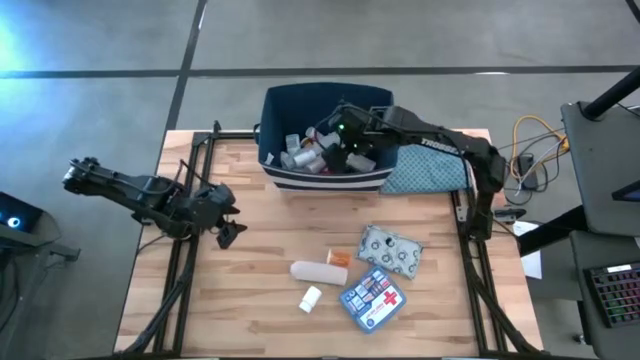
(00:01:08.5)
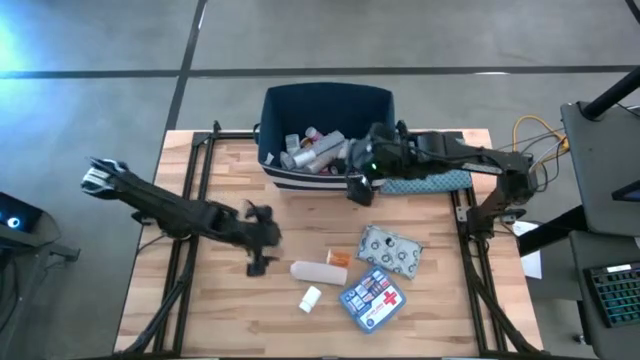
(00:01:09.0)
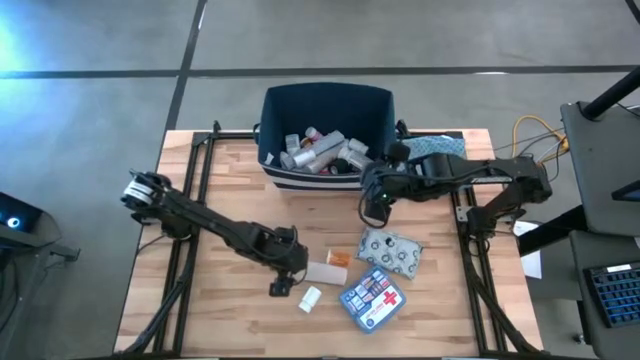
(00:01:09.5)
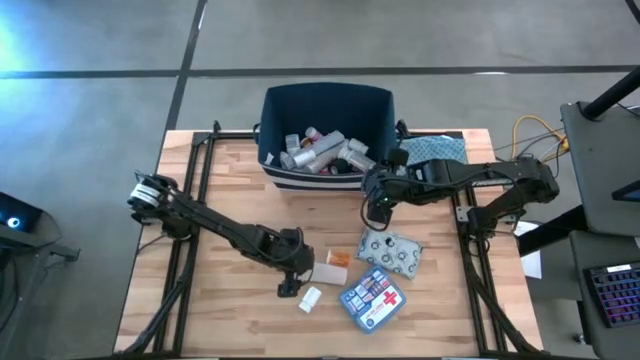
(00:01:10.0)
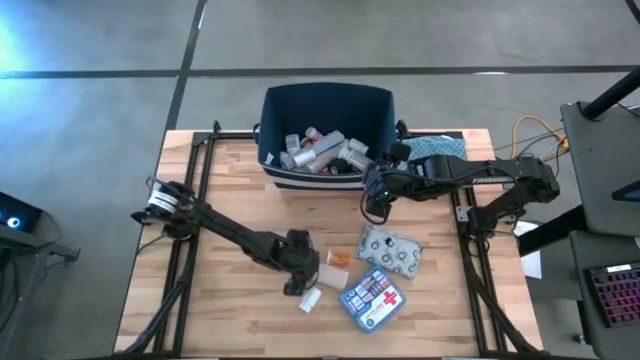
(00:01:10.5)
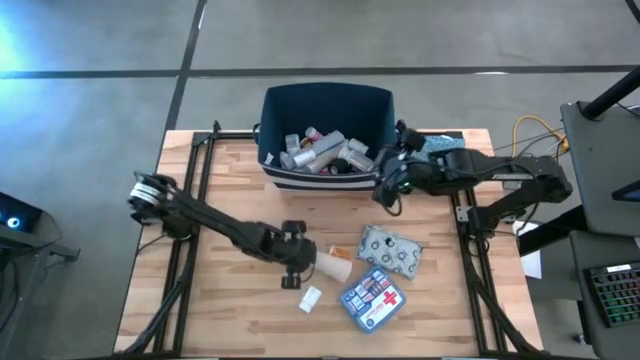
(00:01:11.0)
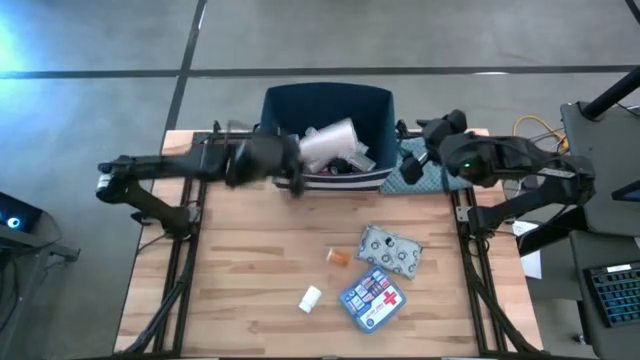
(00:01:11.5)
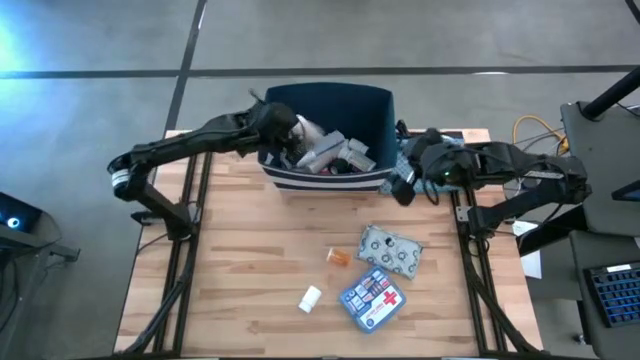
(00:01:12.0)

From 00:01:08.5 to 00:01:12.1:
Task: Pick & place medical supplies in basket/bin
Put the gray bandage into the blue bin

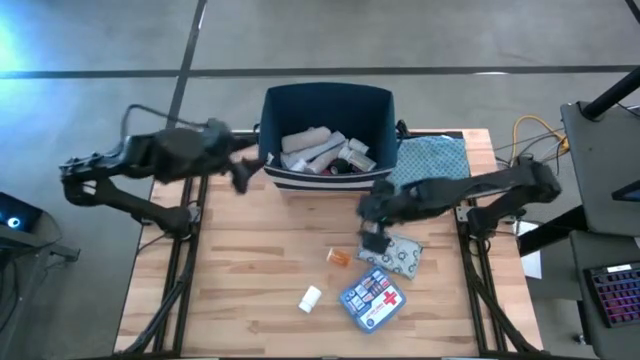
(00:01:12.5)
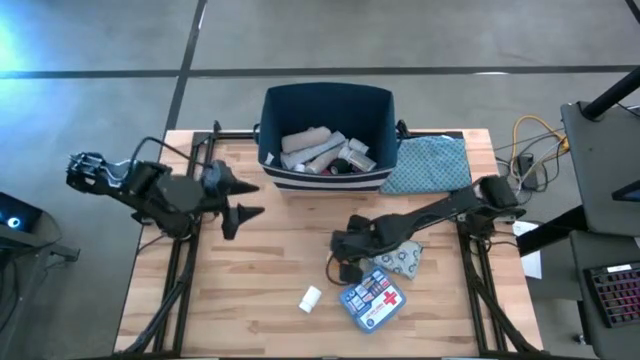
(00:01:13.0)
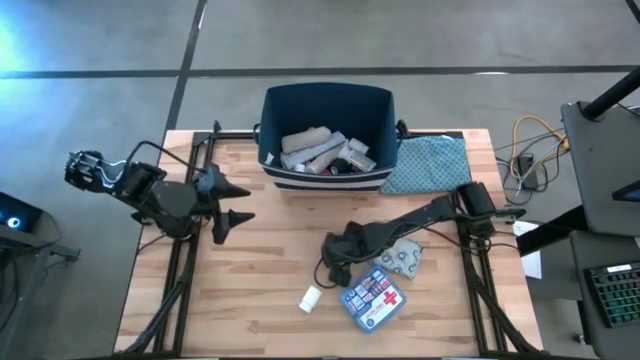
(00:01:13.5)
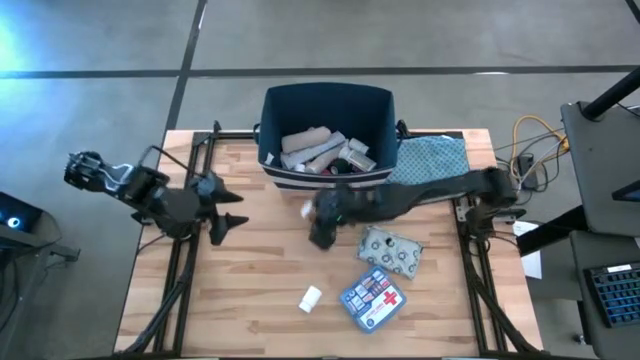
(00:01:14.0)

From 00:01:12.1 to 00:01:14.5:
Put the orange medicine bottle into the blue bin

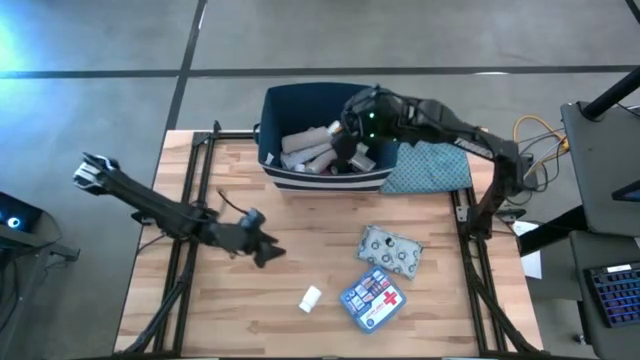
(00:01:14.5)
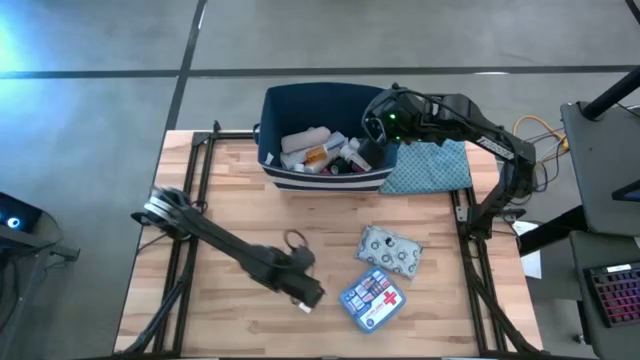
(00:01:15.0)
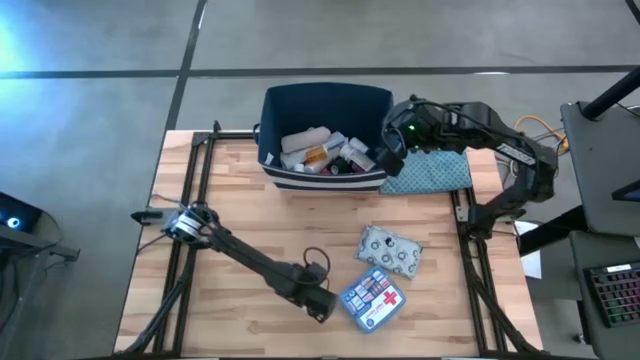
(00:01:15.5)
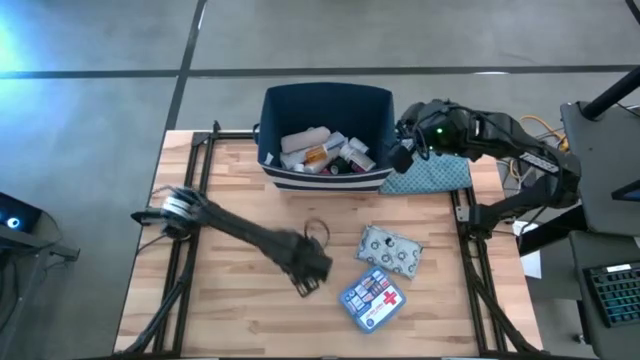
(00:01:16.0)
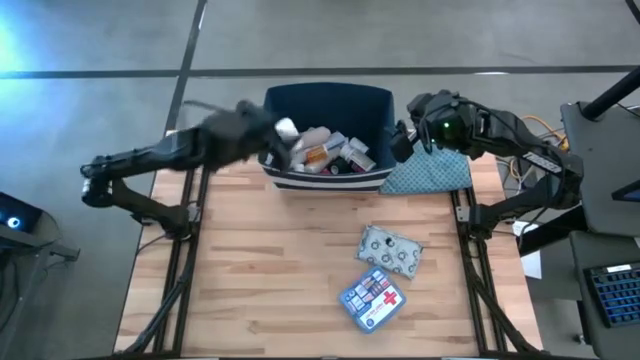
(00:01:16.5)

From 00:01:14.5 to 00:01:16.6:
Put the white medicine bottle into the blue bin

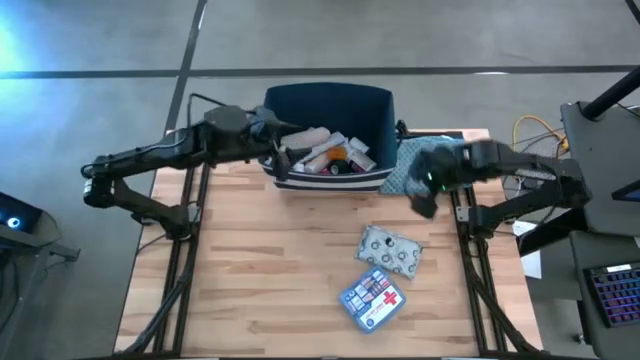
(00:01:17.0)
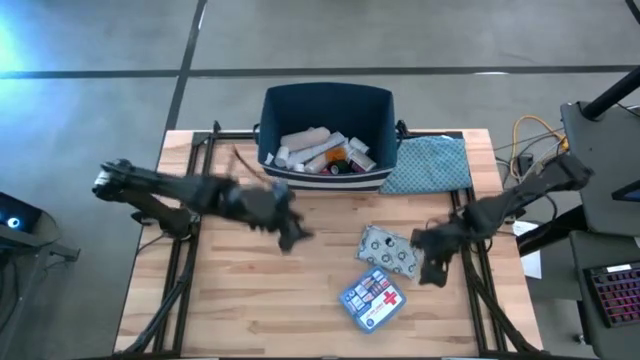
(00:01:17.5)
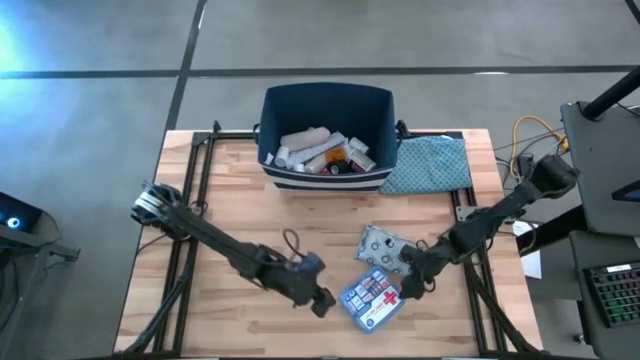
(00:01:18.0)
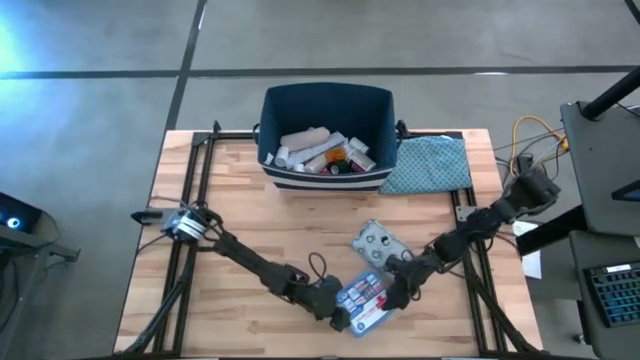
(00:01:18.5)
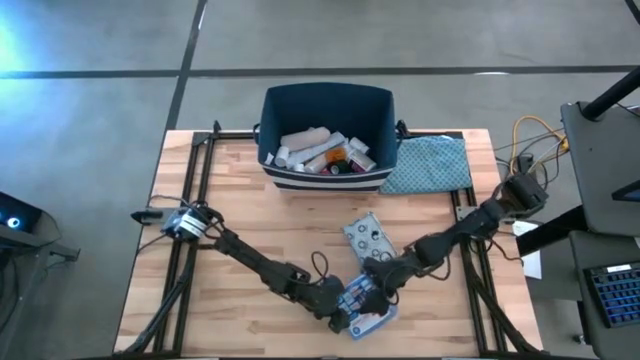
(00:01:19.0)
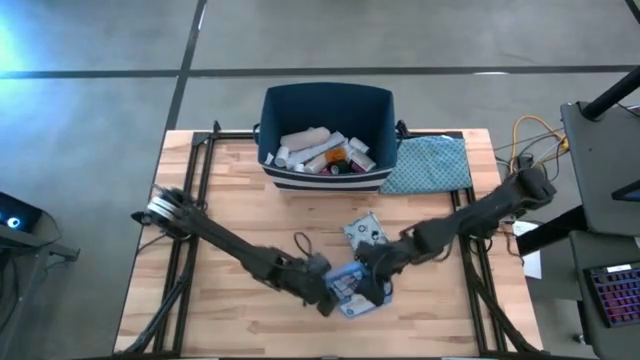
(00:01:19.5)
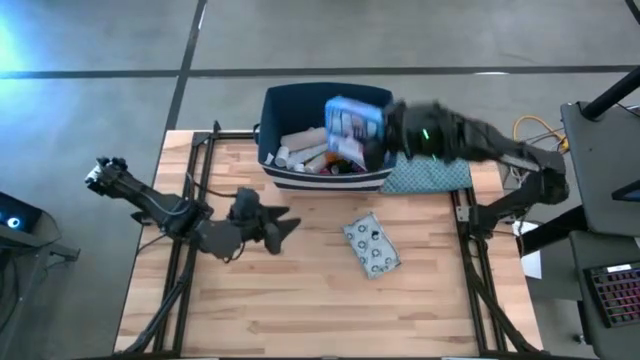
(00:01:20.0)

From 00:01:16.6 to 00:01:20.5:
Put the blue first aid kit into the blue bin

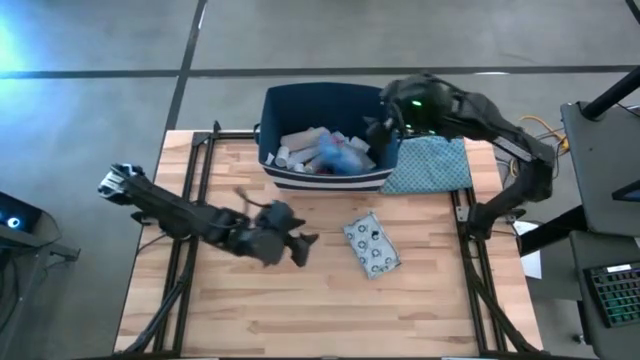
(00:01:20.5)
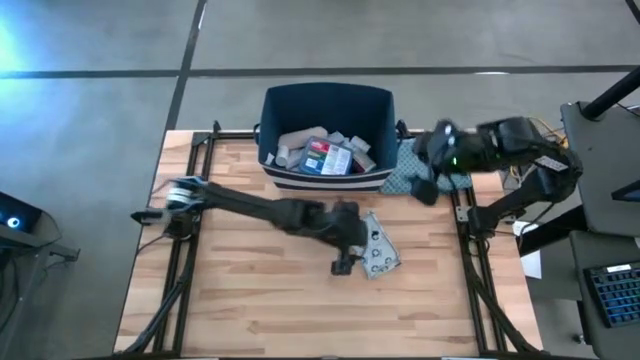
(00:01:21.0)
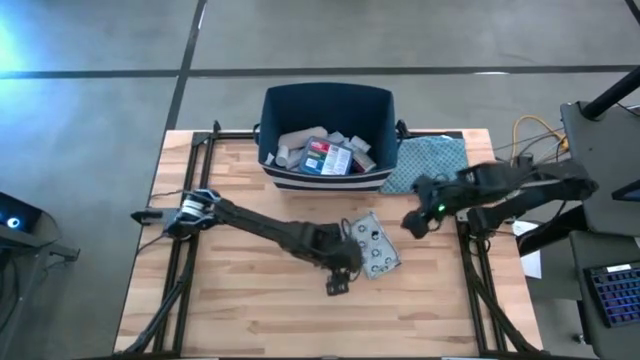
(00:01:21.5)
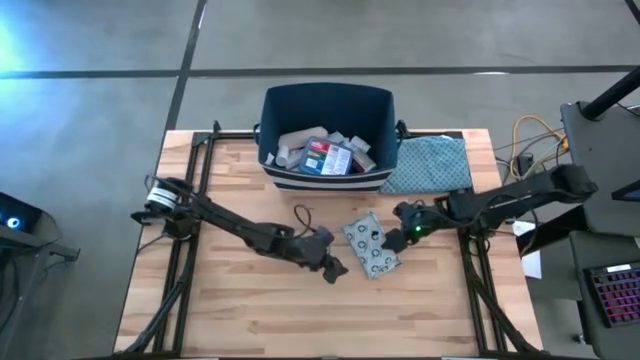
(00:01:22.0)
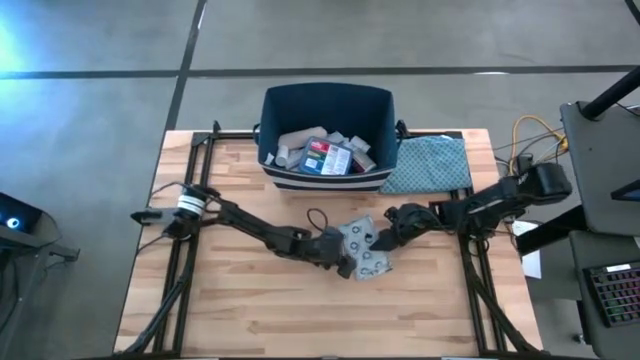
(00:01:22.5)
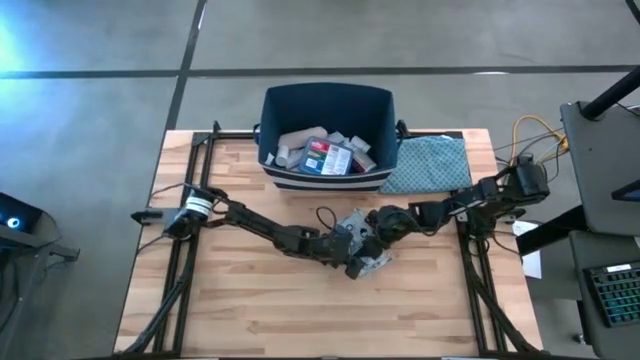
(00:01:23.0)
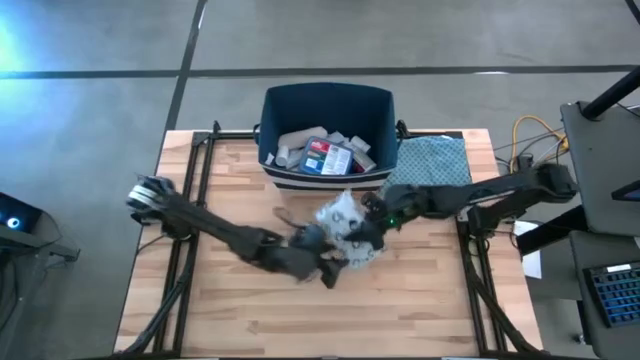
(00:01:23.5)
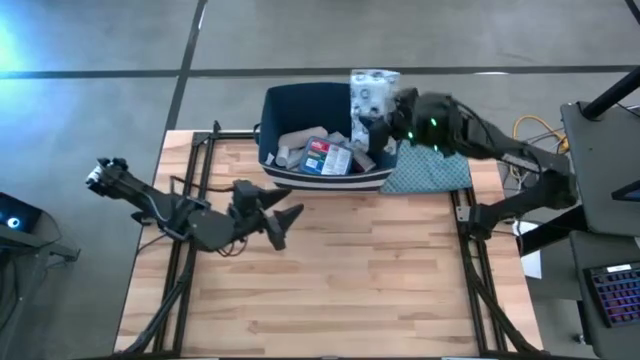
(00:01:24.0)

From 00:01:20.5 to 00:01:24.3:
Put the mailer bag into the blue bin

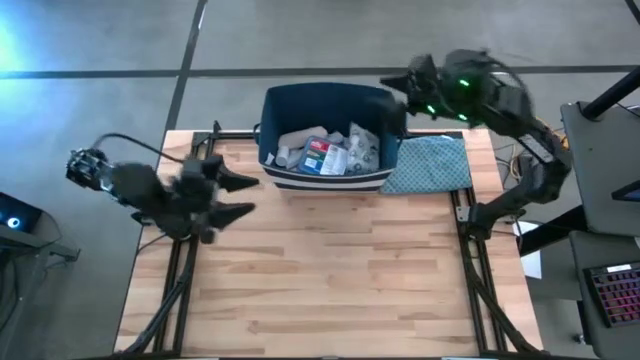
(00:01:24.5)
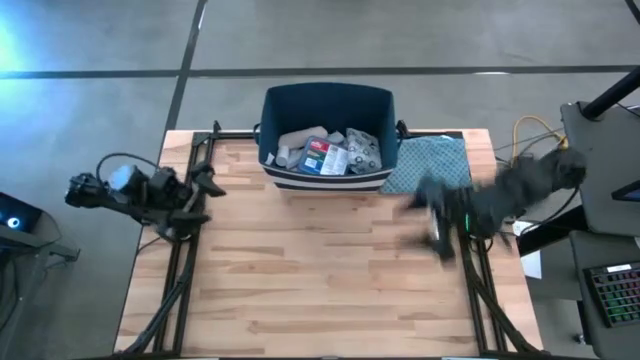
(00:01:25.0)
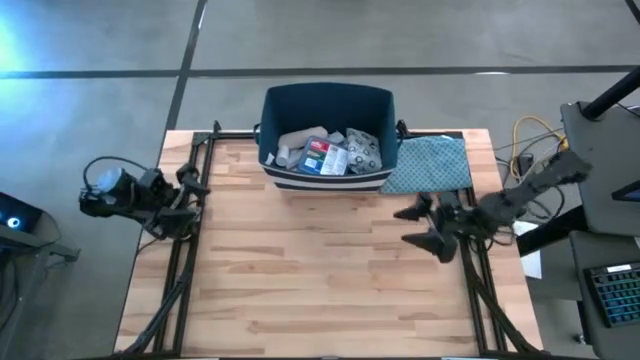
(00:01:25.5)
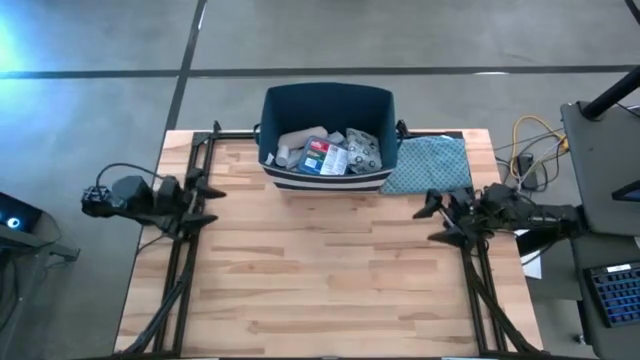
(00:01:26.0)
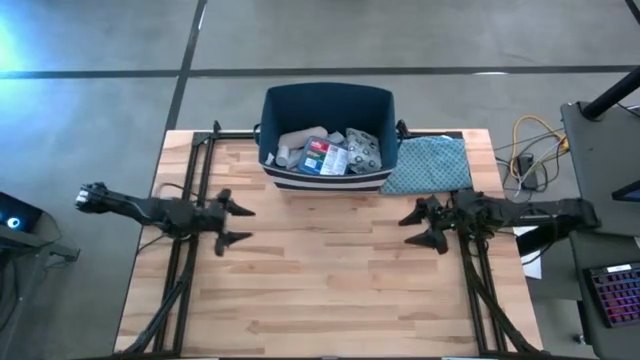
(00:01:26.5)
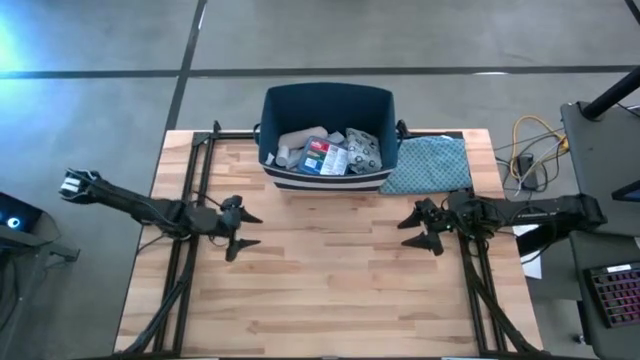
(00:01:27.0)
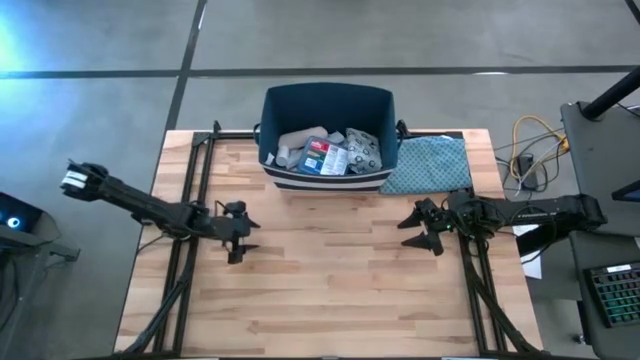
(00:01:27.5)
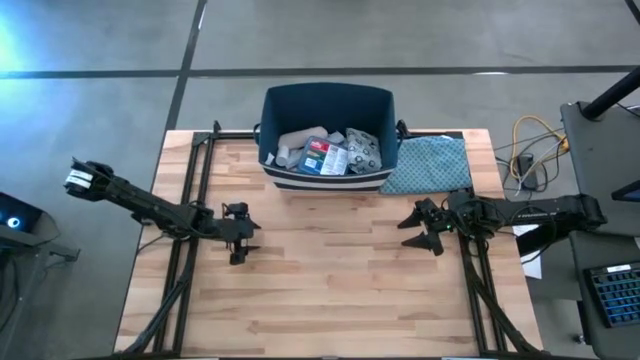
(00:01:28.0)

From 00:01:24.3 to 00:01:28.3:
Return to Home Position

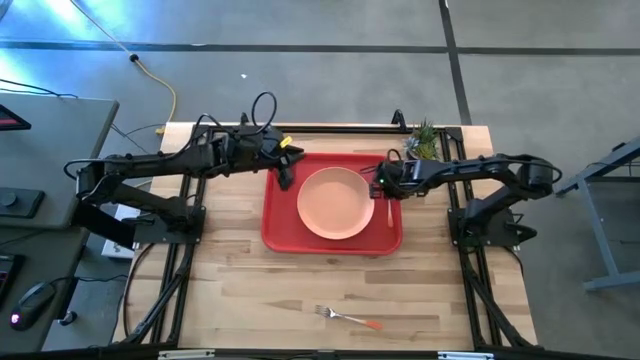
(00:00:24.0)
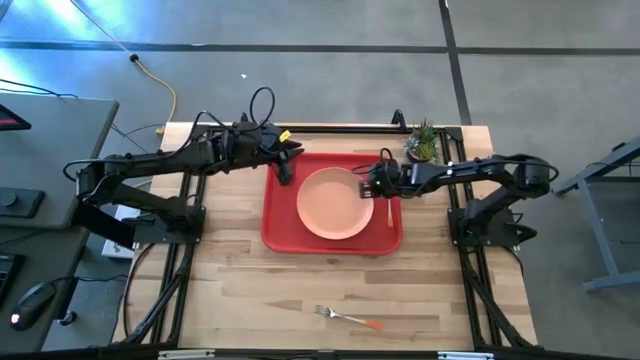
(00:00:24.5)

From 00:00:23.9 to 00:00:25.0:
Task: Pick and place plate/cup/fork/spoon on tray
Adjust the orange plate on the red tray
